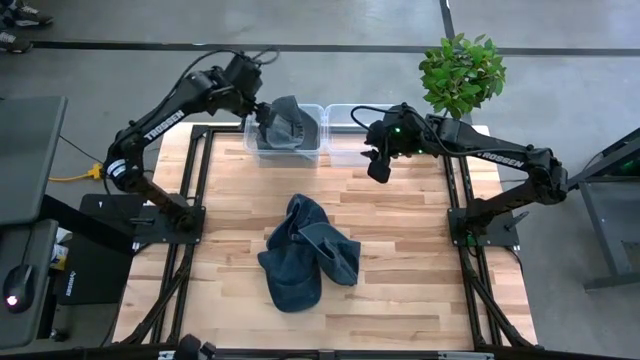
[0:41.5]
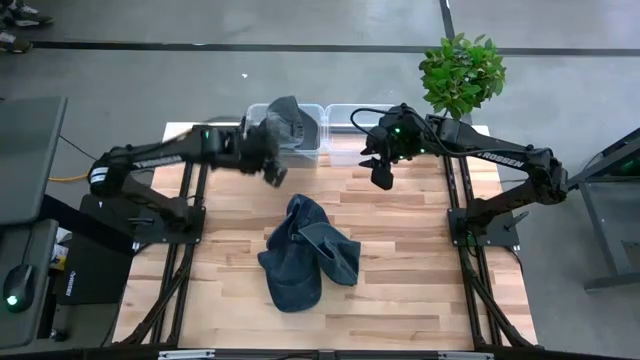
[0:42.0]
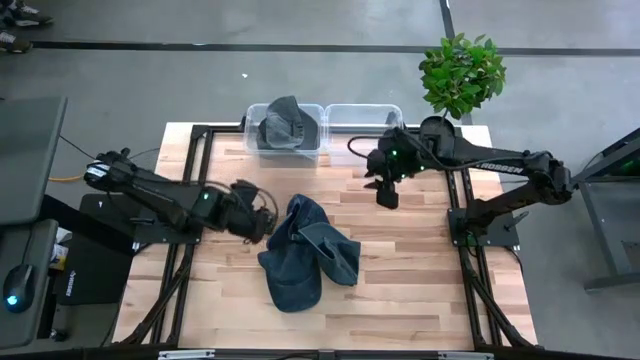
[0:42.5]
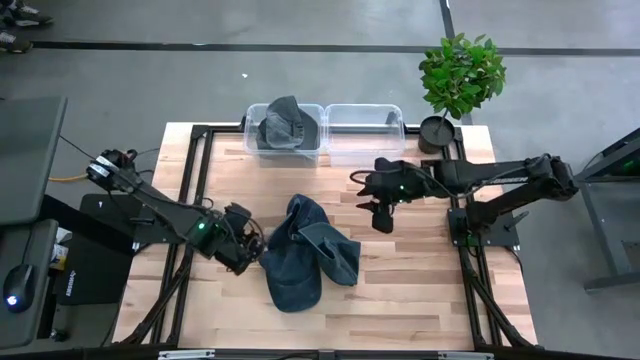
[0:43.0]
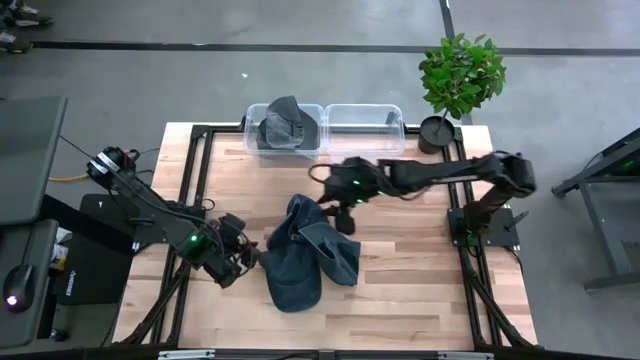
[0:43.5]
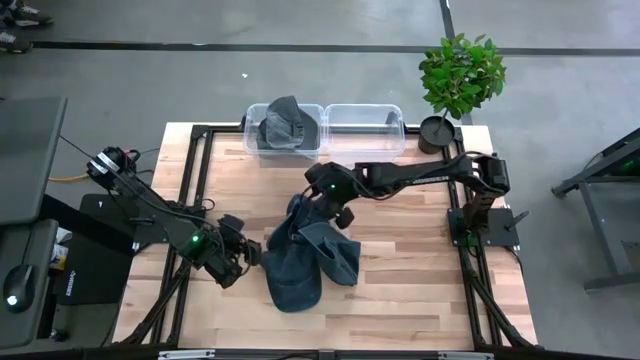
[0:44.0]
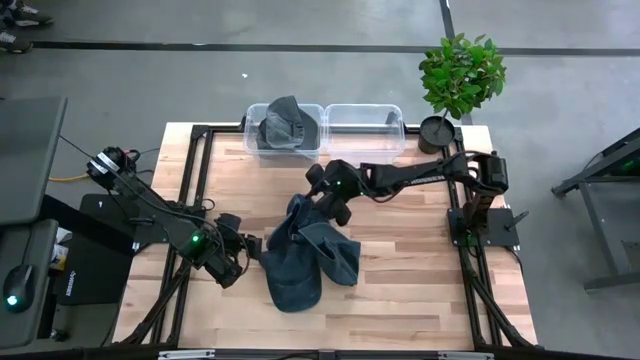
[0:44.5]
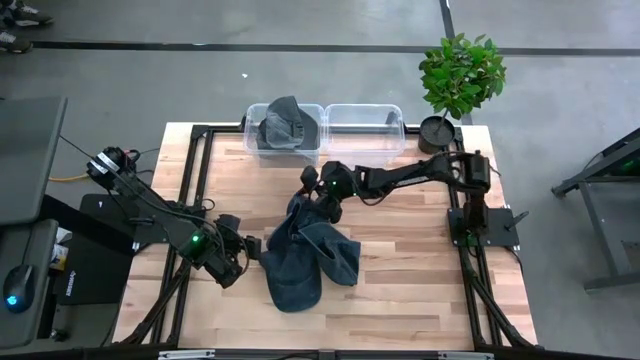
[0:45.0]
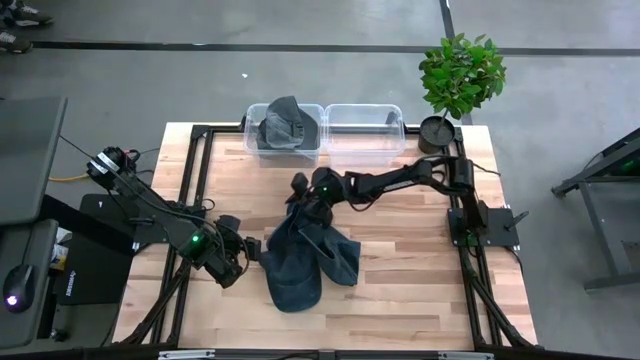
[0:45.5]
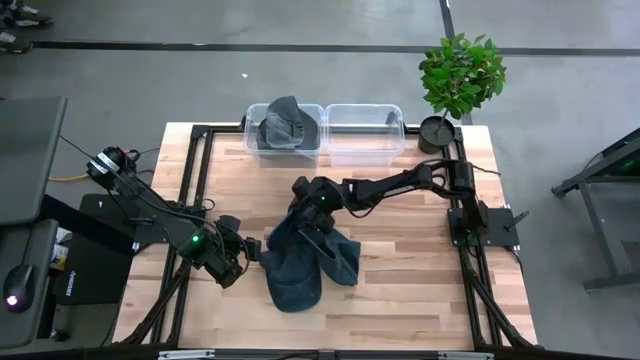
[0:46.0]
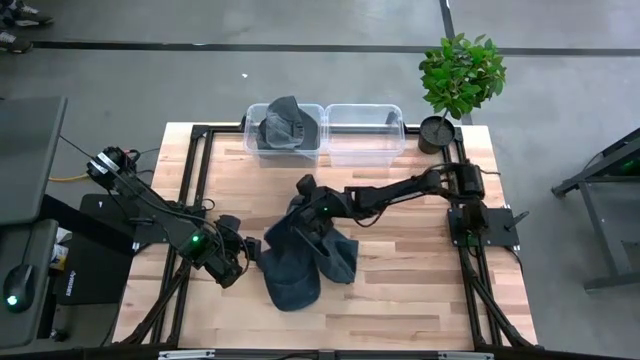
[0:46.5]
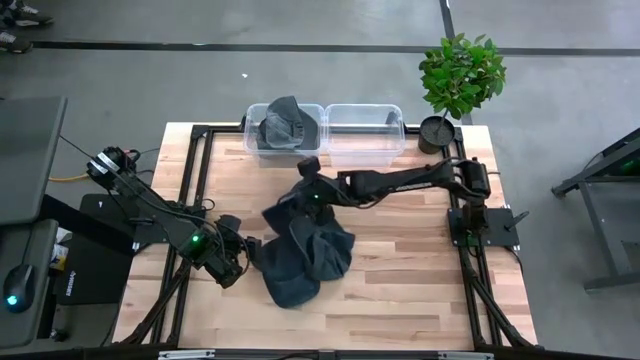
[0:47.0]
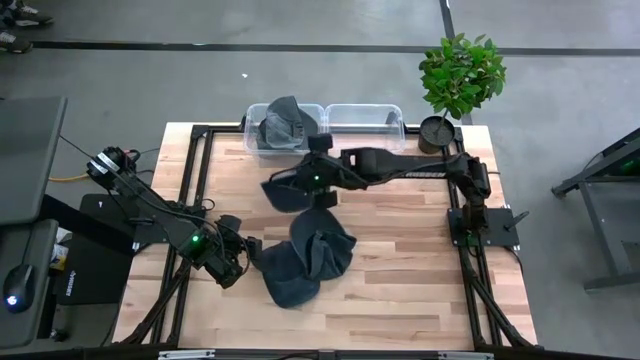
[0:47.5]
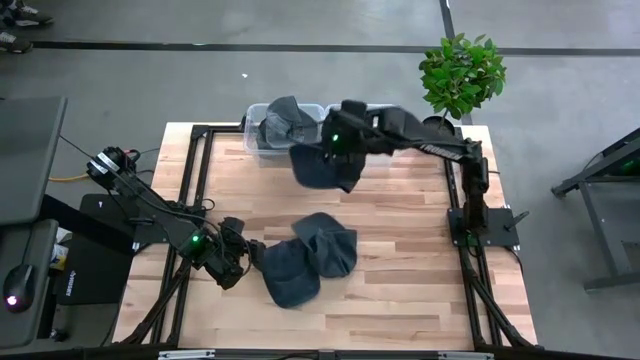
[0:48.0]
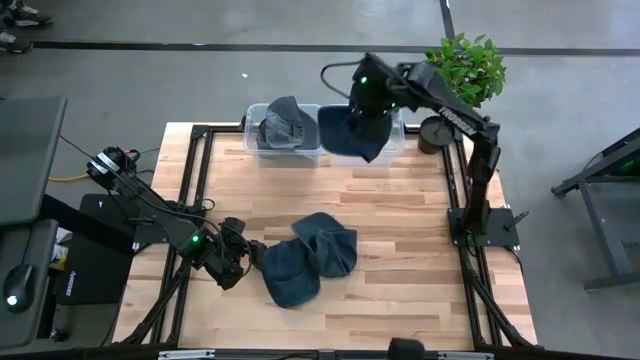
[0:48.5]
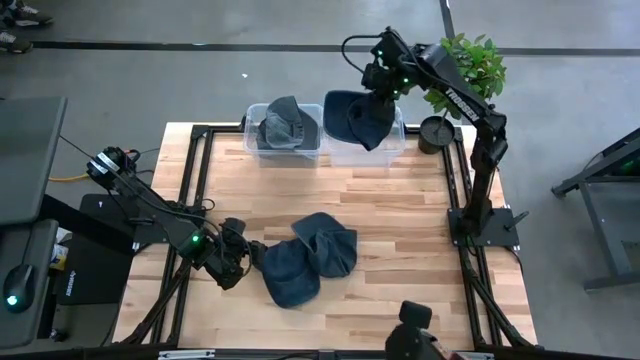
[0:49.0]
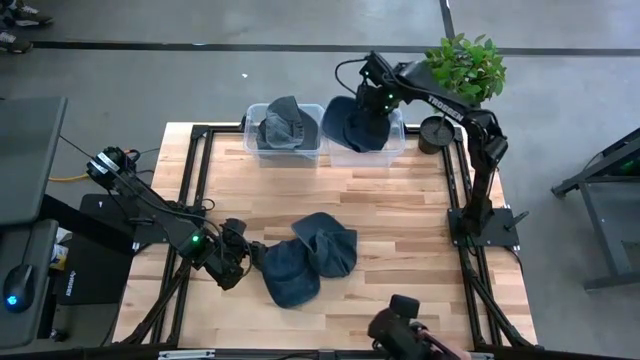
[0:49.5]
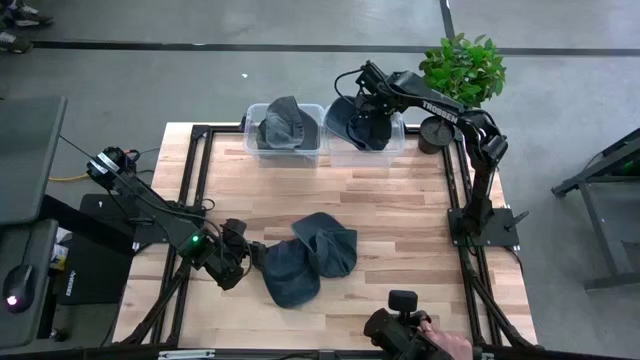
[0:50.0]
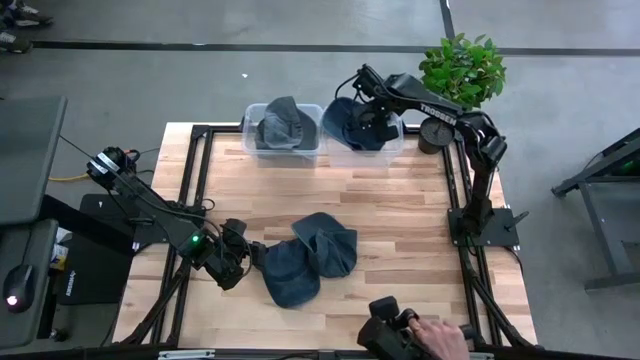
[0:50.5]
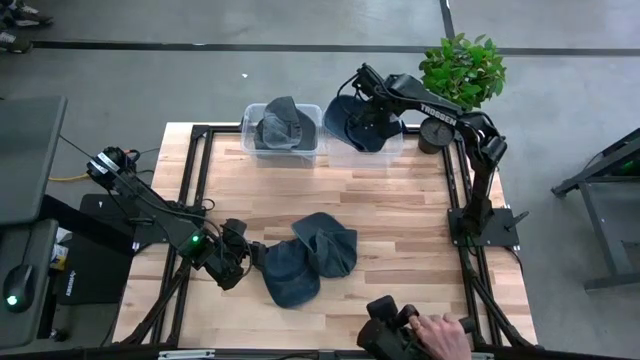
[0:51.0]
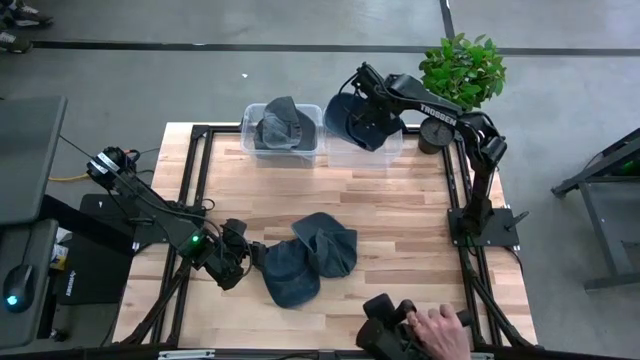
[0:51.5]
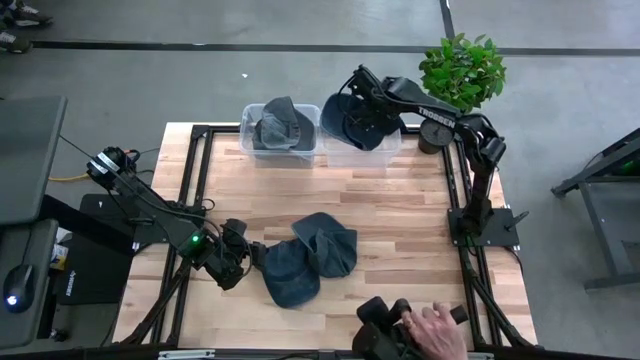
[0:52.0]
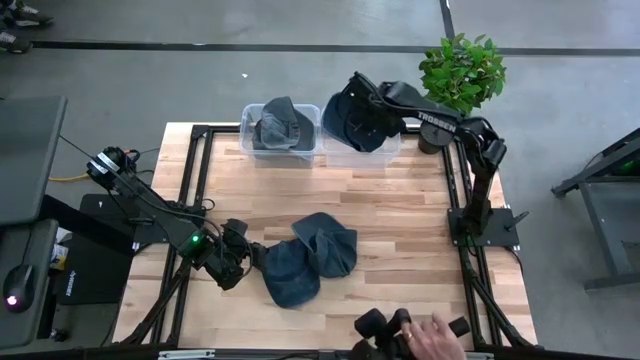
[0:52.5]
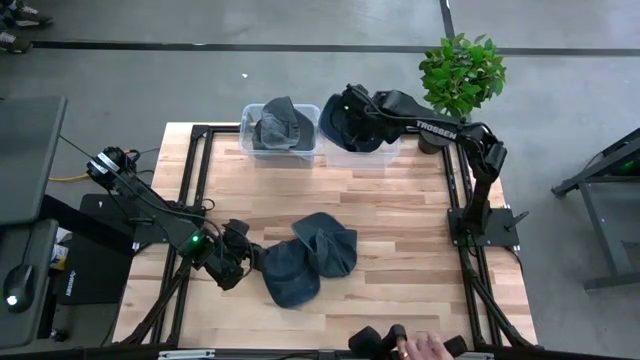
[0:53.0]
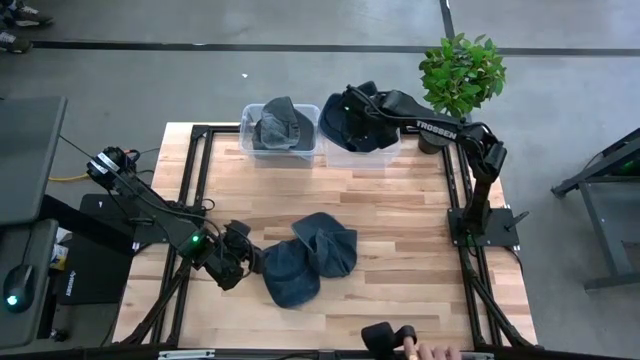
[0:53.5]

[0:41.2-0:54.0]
Task: Pick and place caps into container
Put the top blue cap into the right transparent container

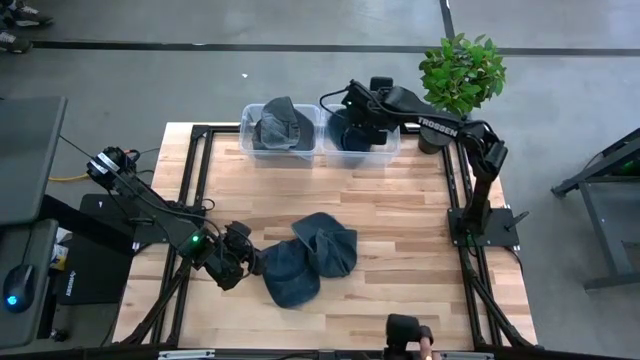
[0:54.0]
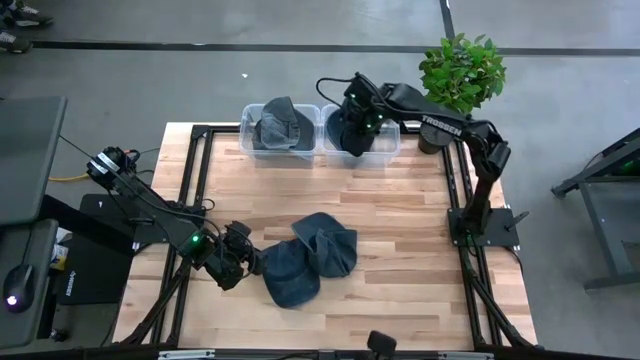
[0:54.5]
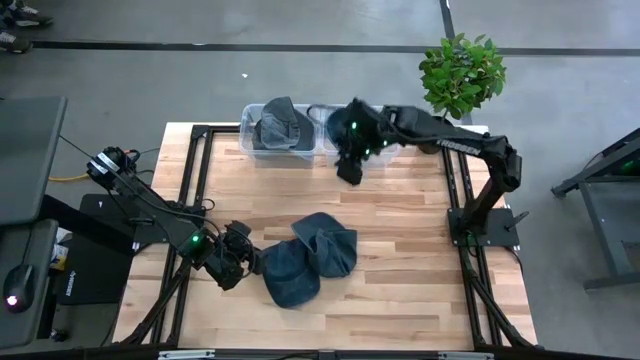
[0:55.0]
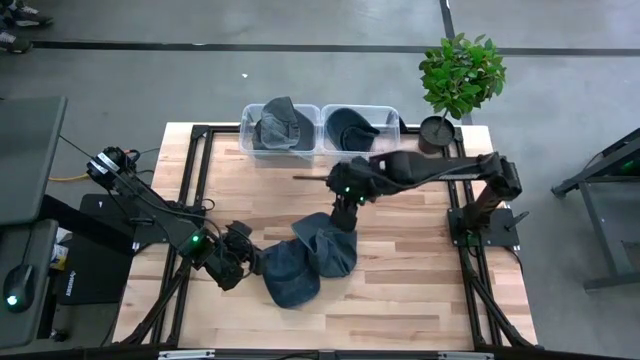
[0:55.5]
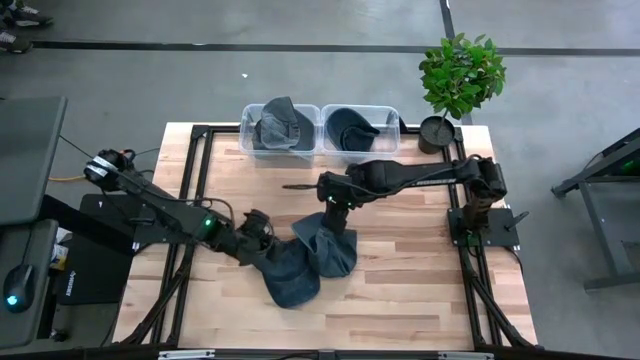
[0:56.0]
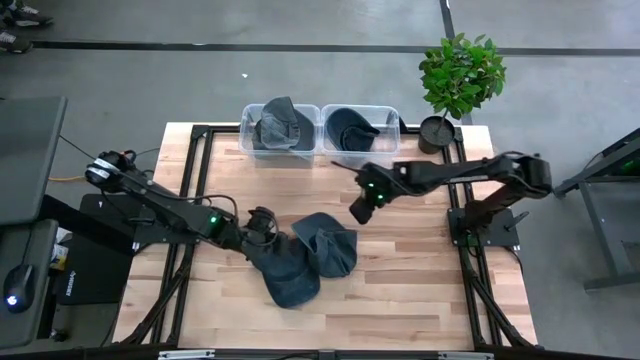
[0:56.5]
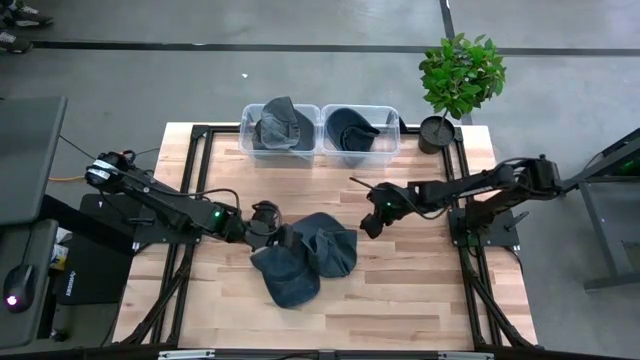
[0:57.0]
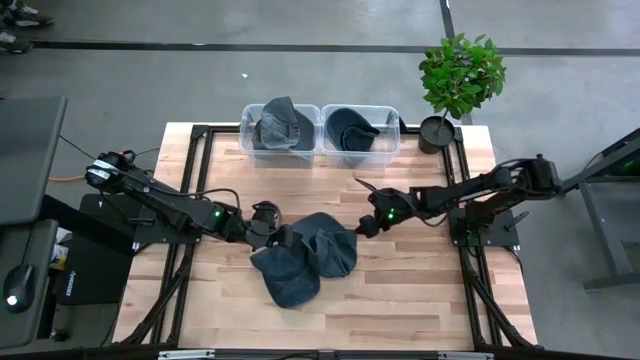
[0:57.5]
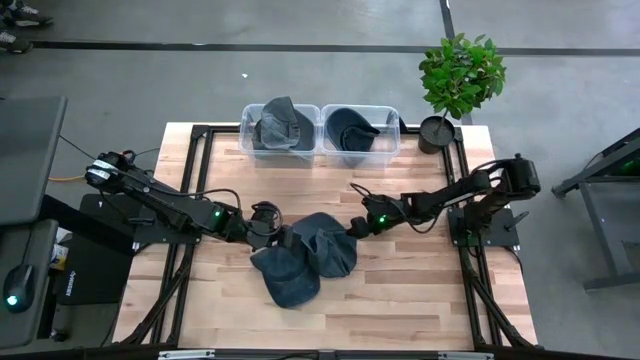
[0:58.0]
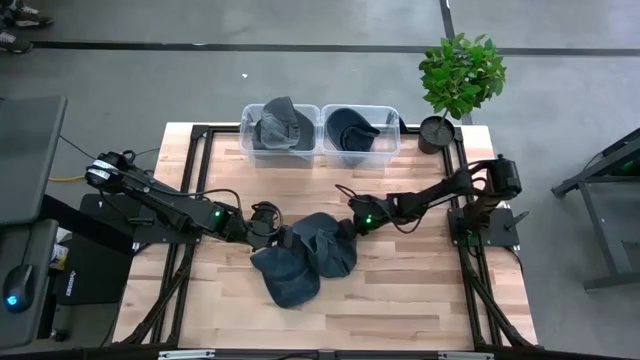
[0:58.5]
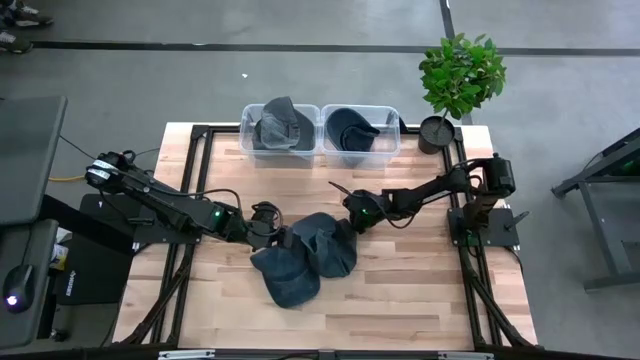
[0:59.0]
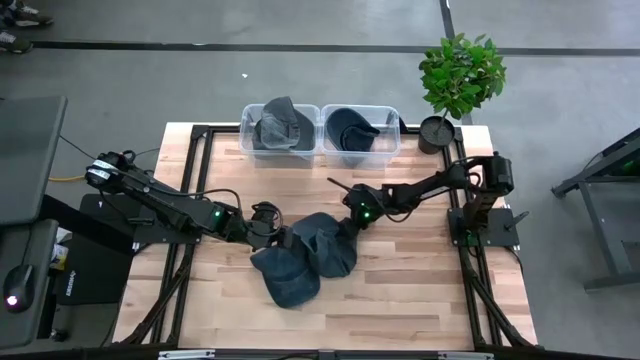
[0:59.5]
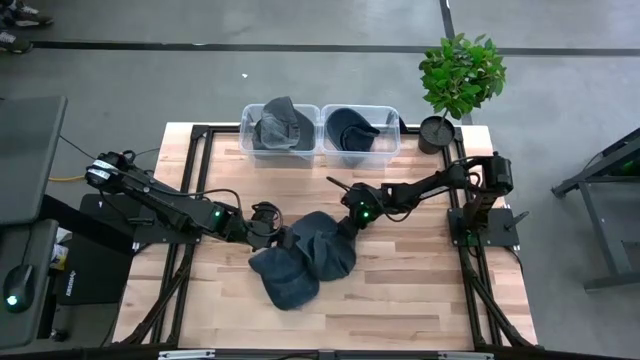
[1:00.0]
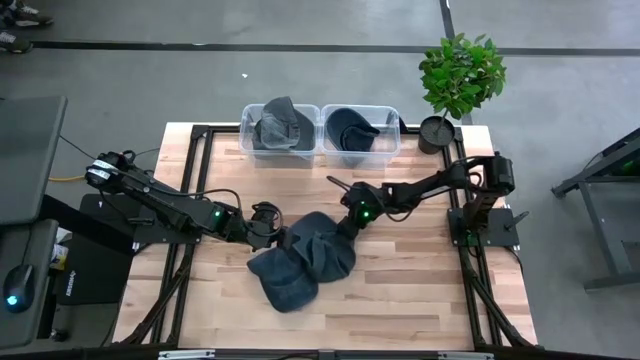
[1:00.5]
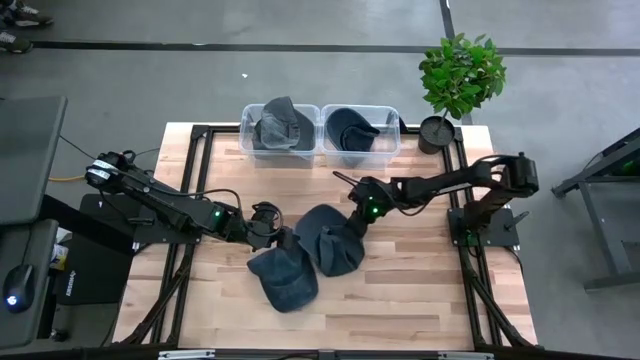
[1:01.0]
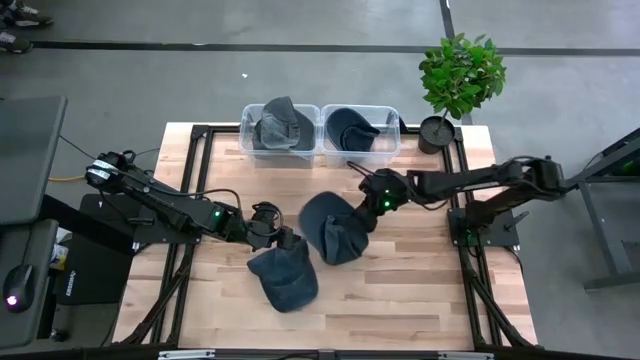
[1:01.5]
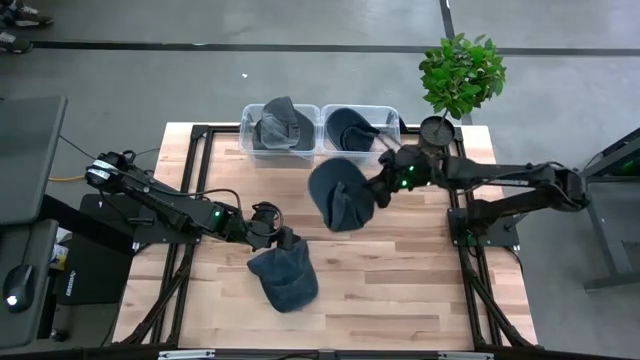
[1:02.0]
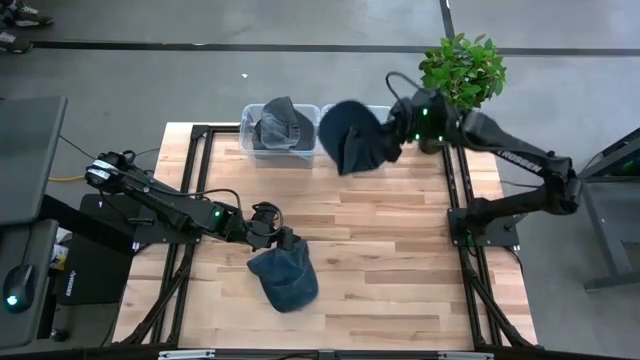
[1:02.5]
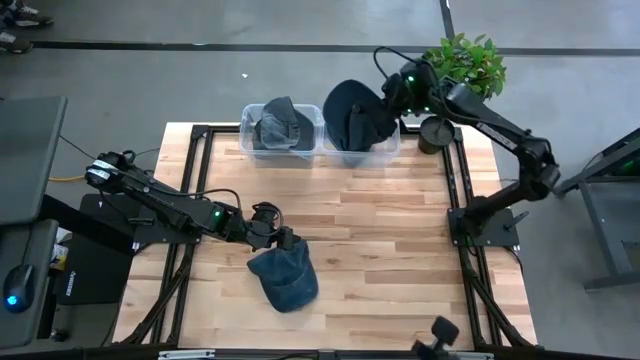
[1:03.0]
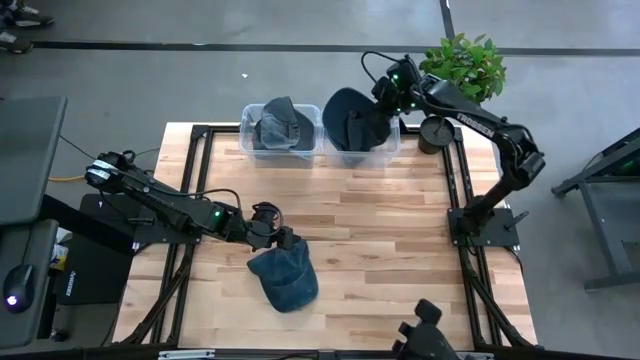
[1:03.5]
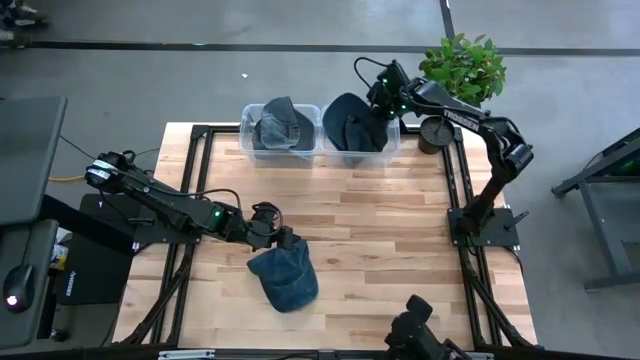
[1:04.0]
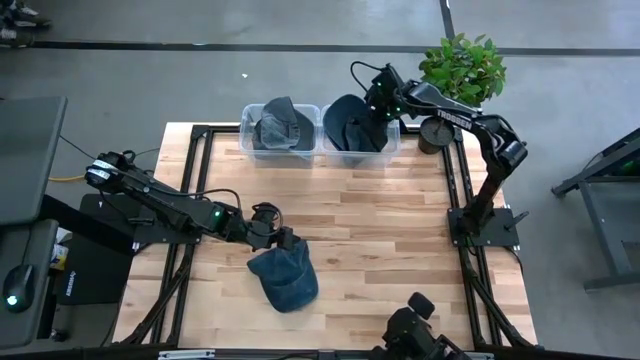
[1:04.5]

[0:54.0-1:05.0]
Put the right blue cap into the right transparent container
